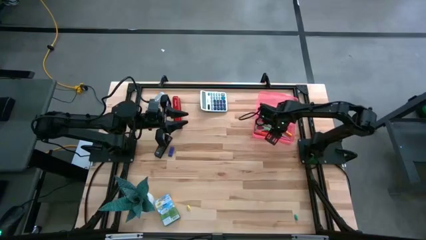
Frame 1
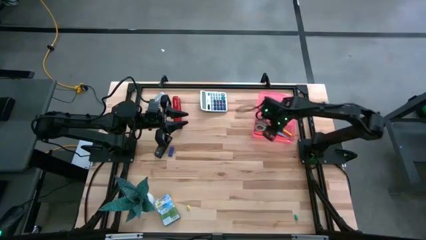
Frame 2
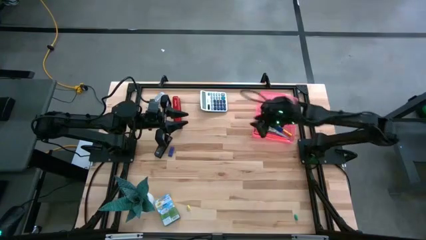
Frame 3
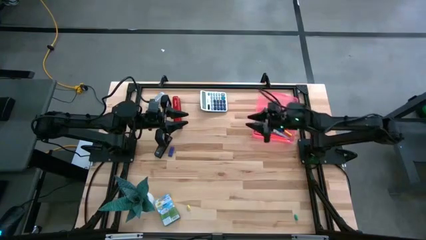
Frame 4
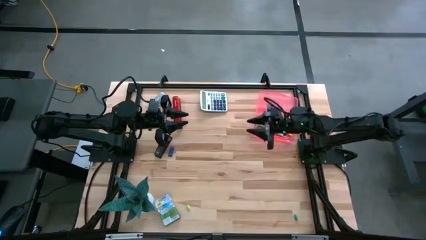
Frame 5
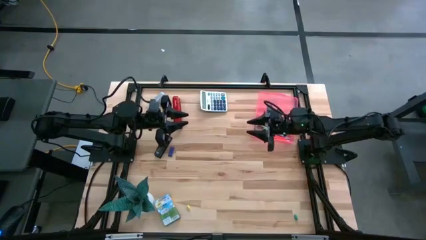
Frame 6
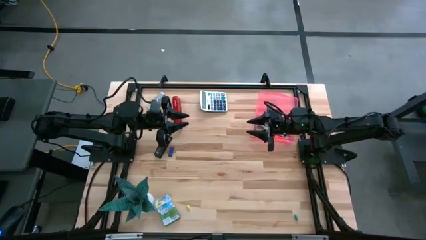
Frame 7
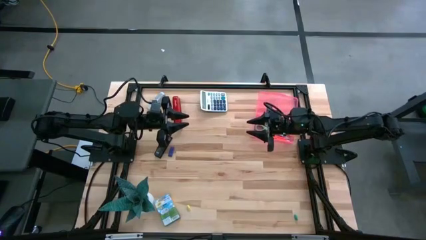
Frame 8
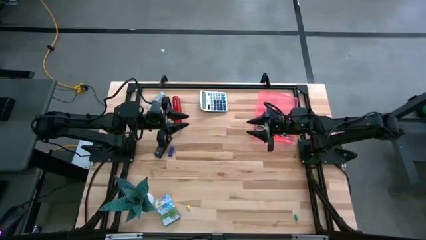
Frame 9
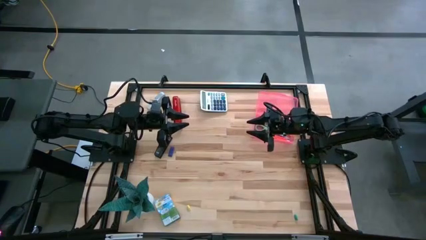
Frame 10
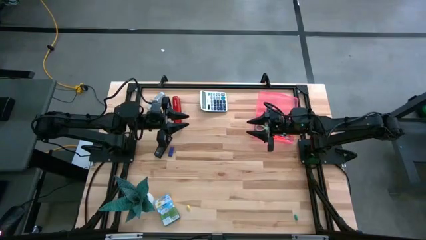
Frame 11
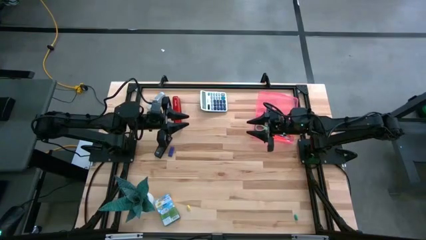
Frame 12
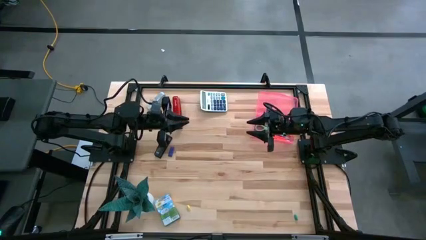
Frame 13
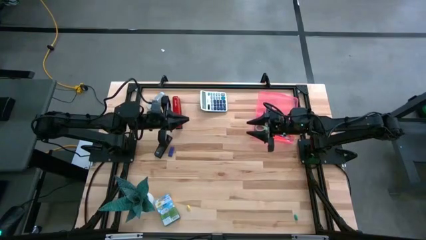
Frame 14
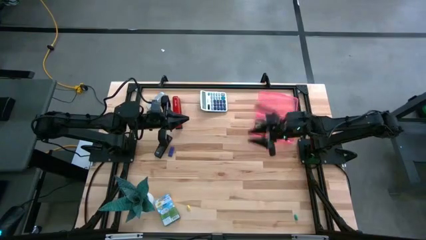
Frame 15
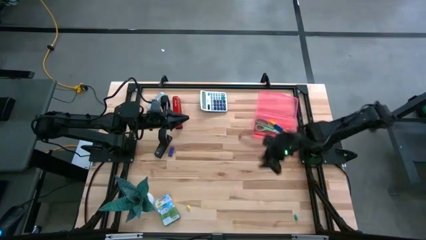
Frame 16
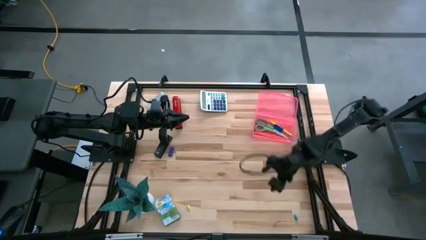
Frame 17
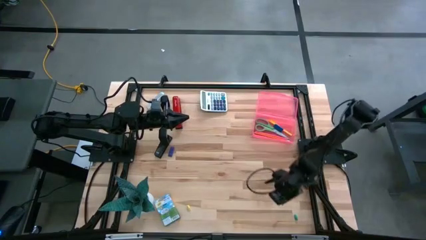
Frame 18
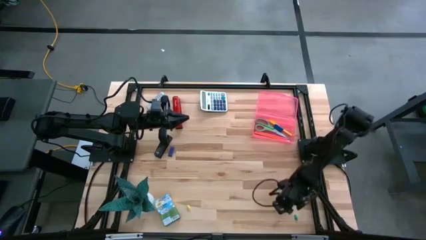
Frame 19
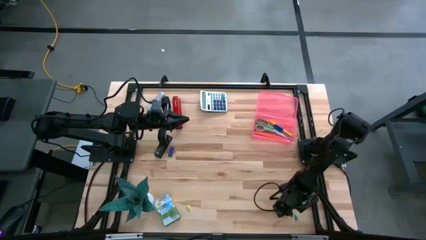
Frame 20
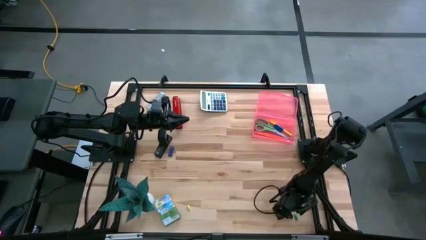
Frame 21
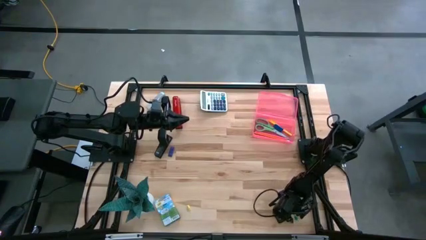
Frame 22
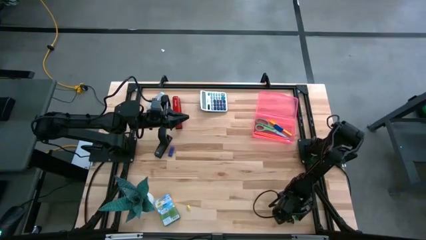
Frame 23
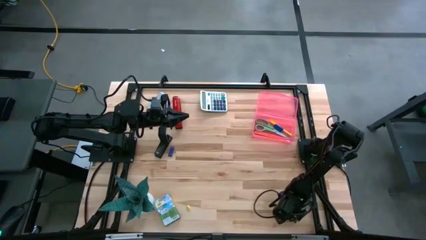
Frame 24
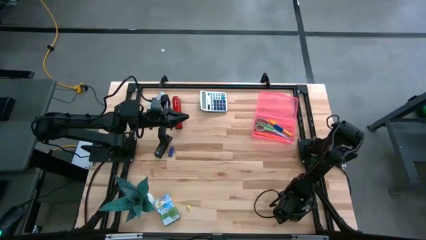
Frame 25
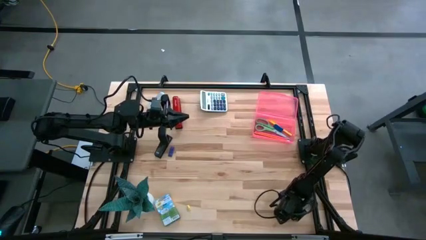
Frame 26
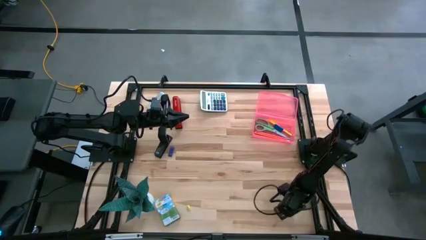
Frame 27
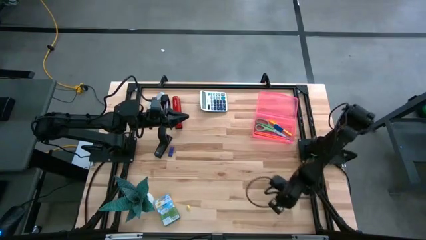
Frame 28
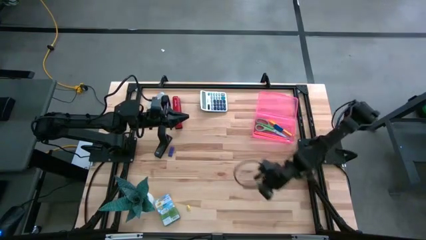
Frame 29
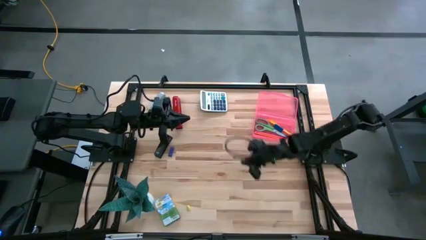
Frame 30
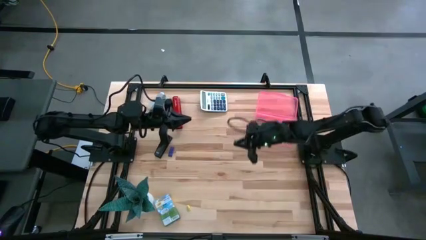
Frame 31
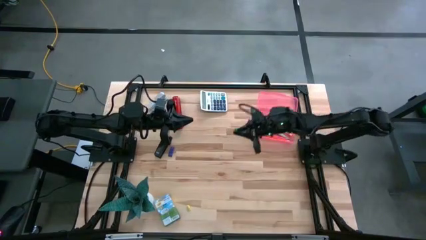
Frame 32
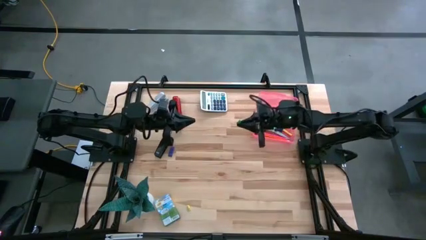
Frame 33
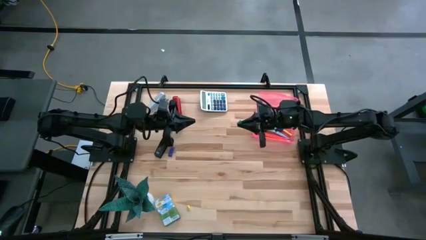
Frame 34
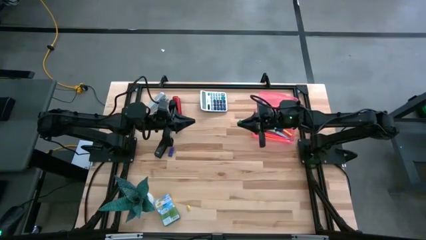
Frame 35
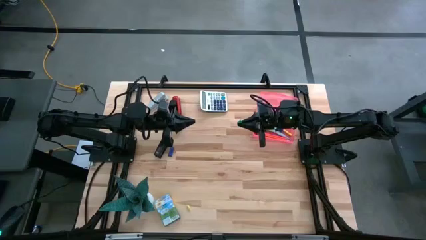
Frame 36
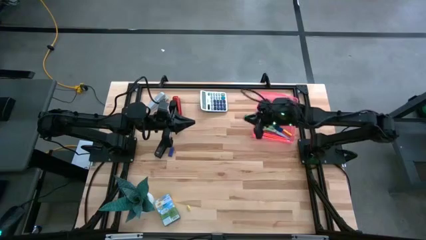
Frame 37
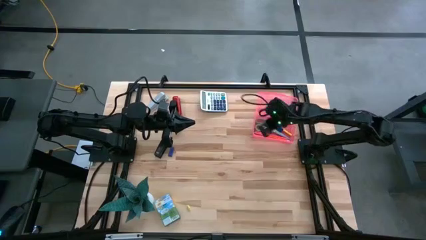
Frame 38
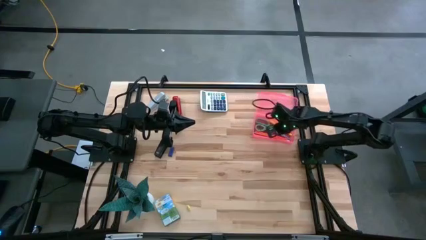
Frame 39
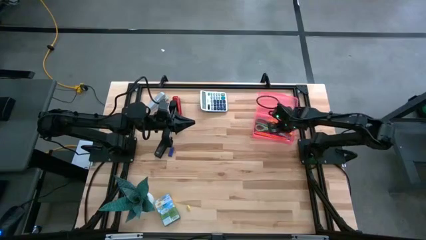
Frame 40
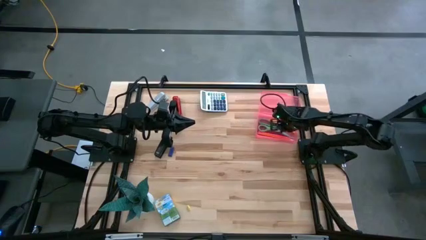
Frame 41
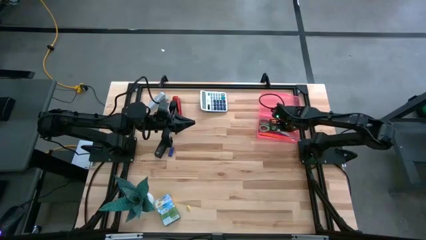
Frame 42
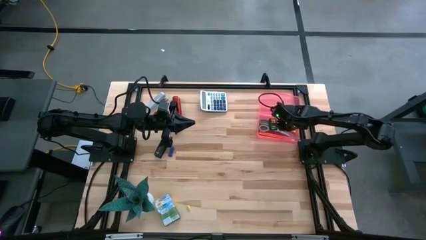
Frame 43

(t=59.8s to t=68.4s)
Task: Pack school essentials
Put the green eraser into the pink supply box

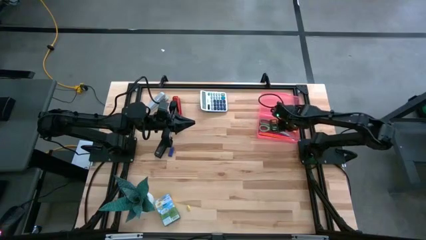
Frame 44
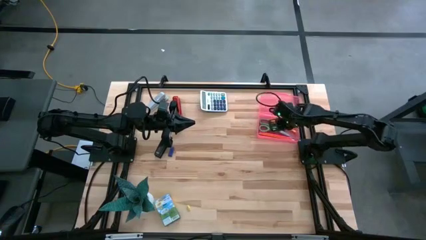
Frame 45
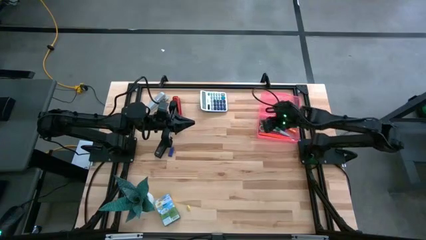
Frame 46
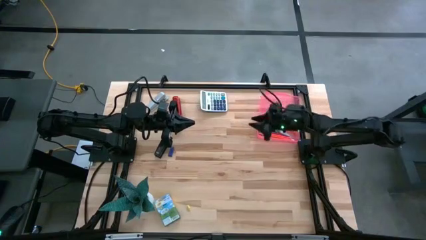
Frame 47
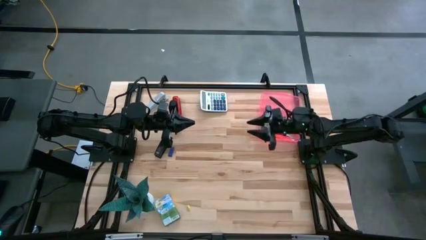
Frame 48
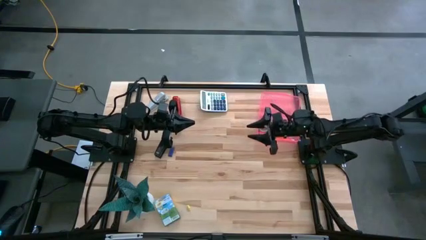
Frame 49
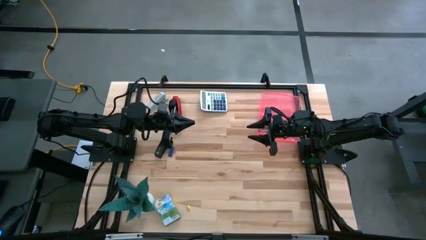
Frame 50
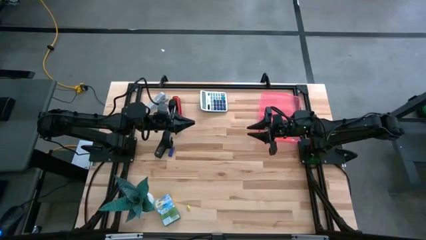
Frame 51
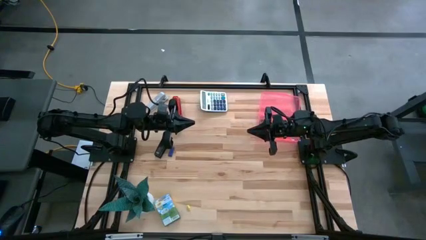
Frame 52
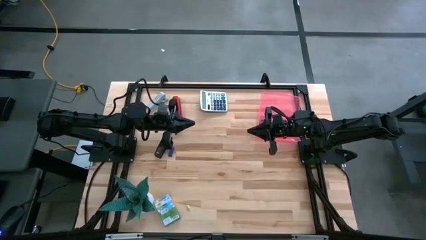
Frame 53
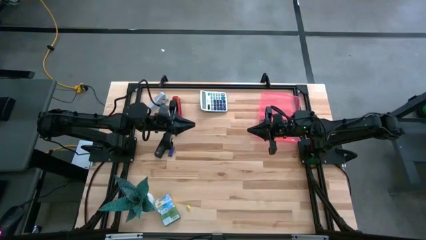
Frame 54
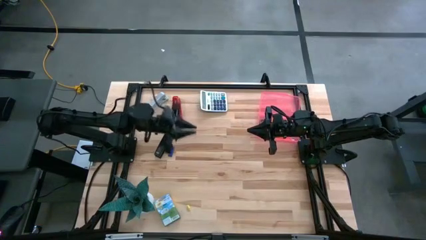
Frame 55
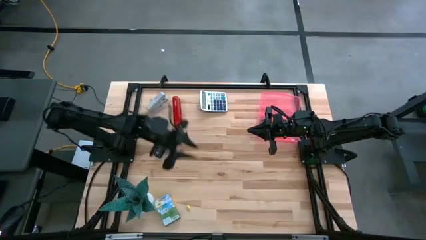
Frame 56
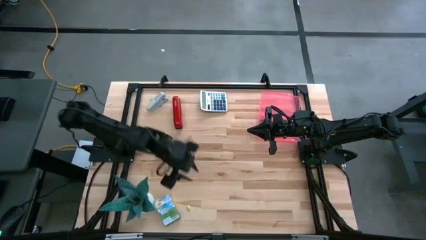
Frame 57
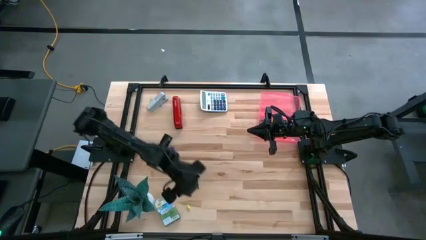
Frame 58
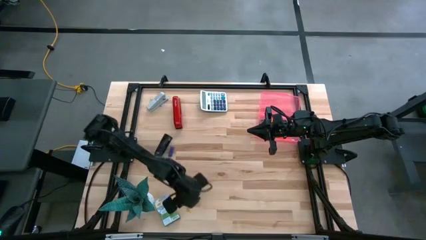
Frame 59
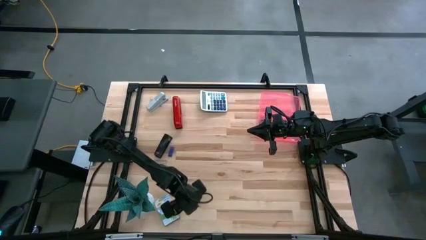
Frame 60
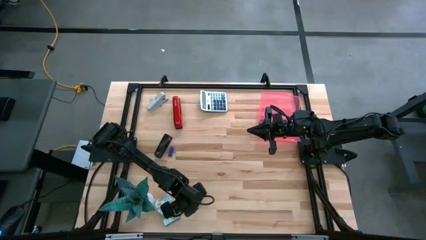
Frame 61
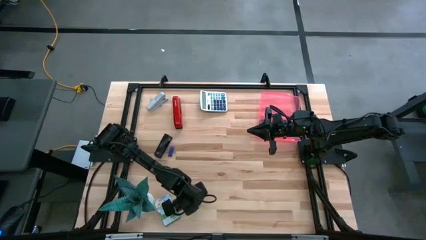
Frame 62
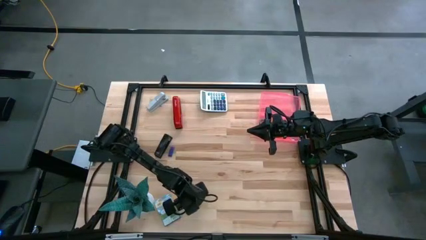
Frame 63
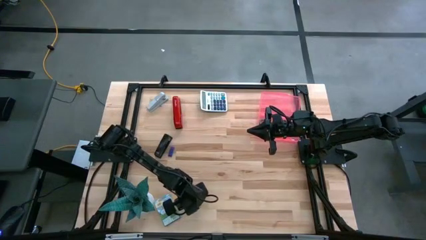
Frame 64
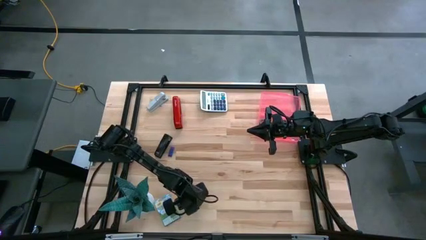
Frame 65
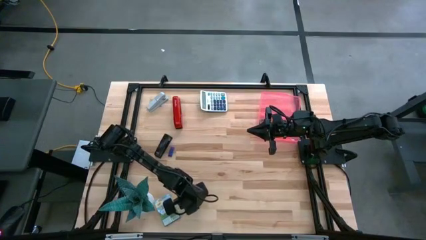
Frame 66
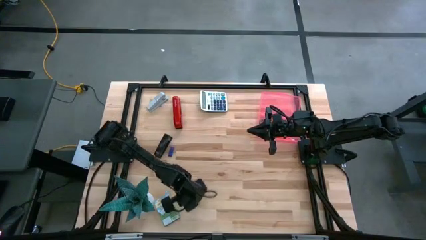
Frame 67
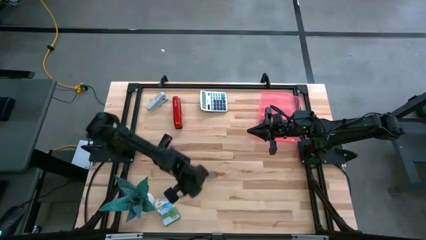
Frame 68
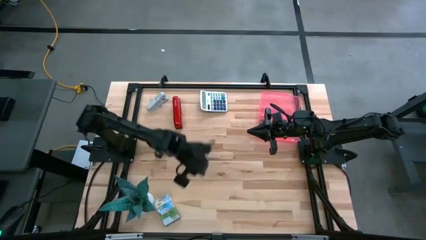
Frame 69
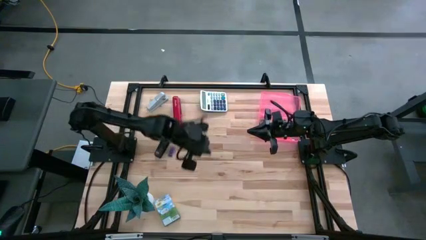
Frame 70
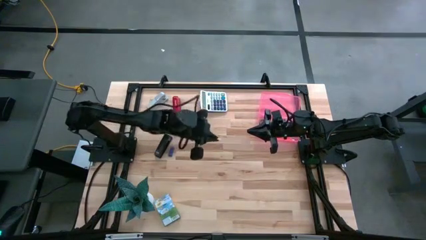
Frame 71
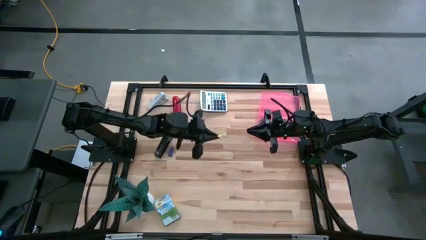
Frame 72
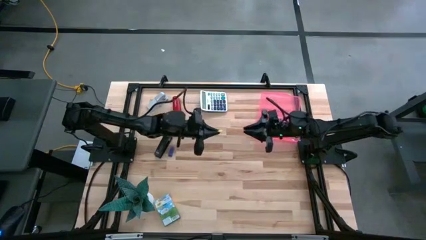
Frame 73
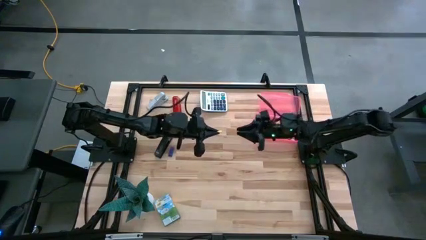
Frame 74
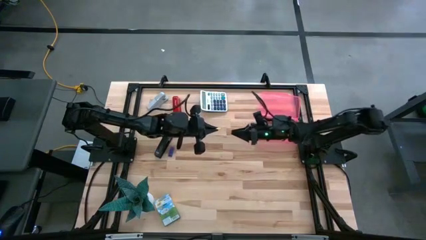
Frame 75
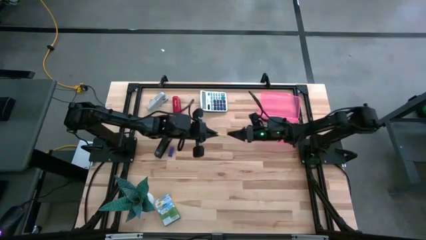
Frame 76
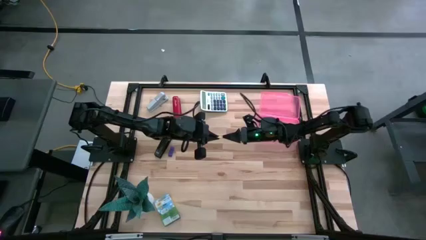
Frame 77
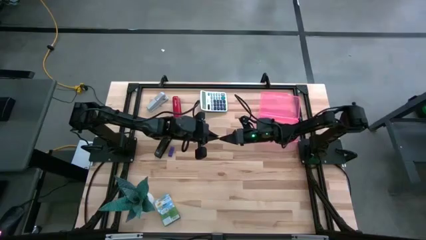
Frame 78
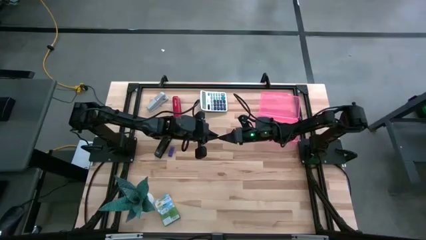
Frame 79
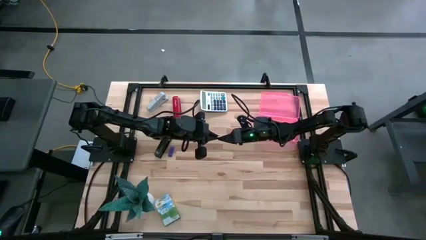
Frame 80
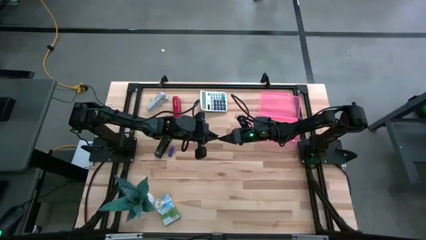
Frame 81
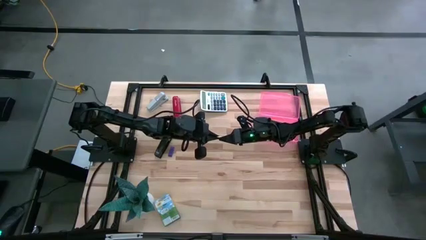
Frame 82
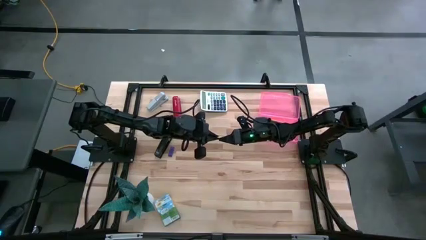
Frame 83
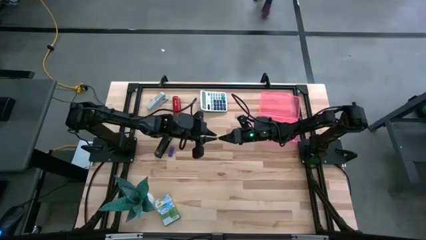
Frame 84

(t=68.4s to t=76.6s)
Put the yellow eraser into the pink supply box
